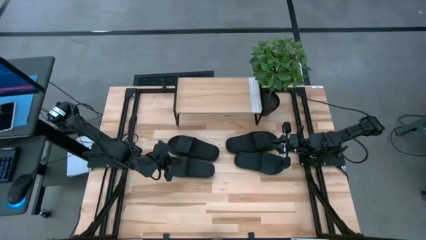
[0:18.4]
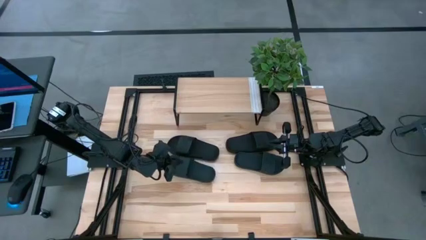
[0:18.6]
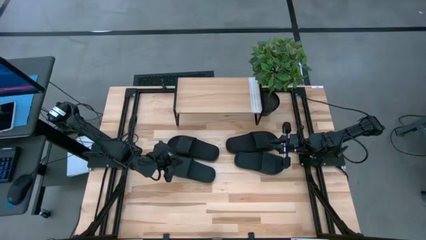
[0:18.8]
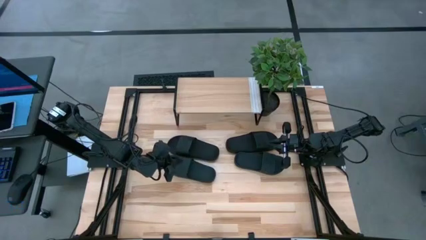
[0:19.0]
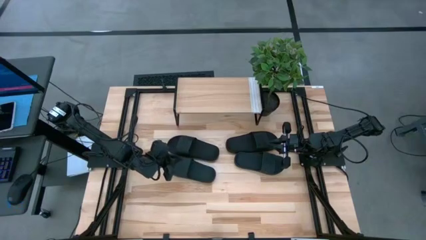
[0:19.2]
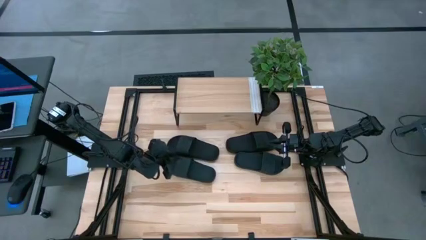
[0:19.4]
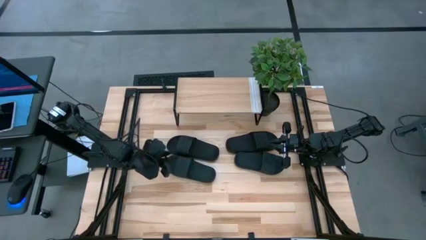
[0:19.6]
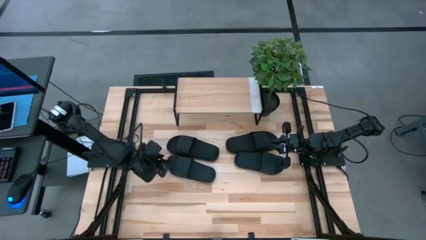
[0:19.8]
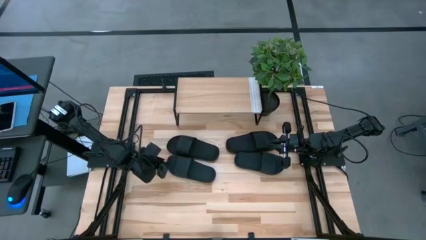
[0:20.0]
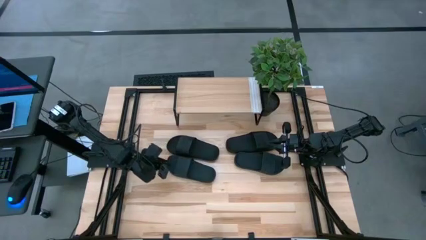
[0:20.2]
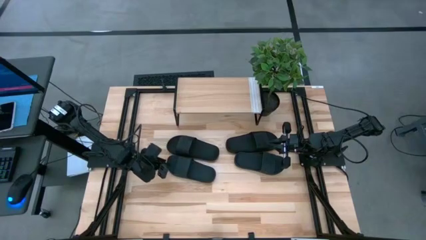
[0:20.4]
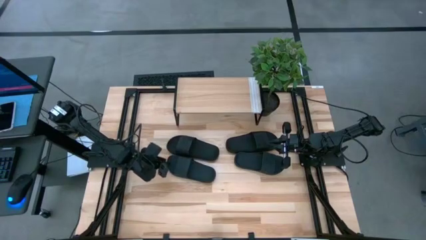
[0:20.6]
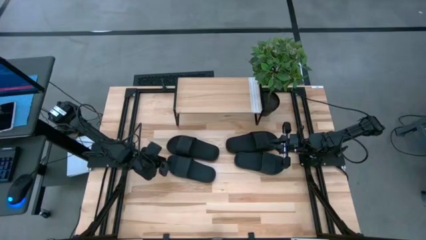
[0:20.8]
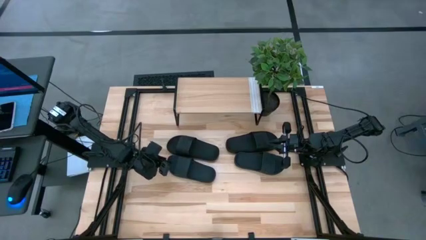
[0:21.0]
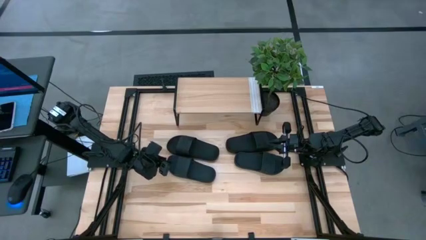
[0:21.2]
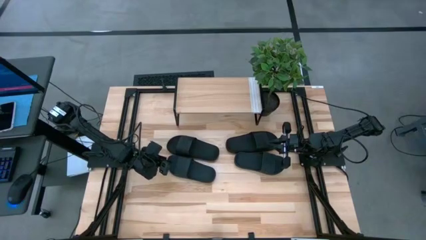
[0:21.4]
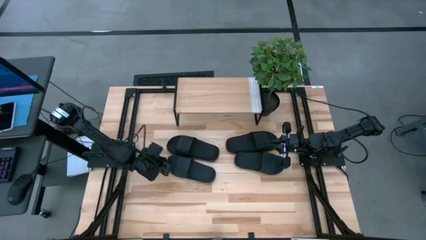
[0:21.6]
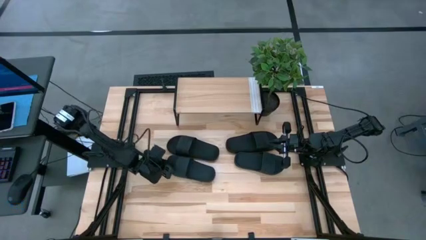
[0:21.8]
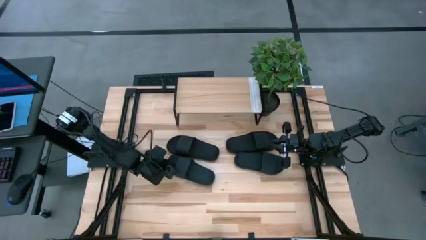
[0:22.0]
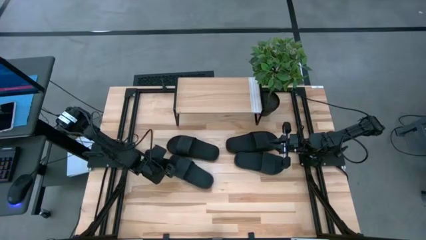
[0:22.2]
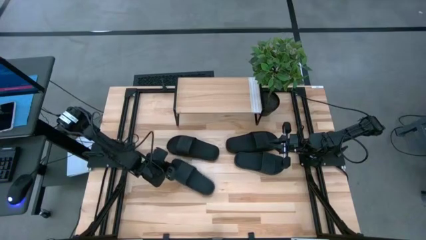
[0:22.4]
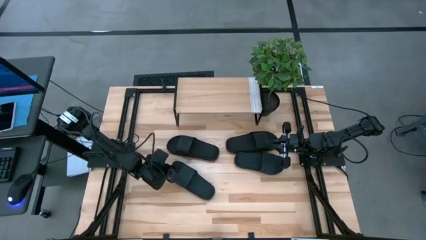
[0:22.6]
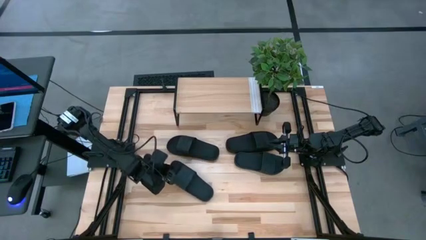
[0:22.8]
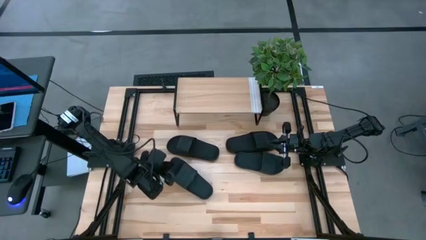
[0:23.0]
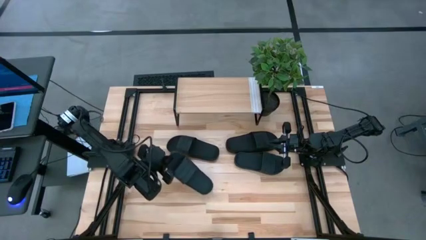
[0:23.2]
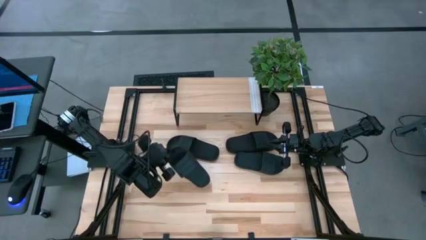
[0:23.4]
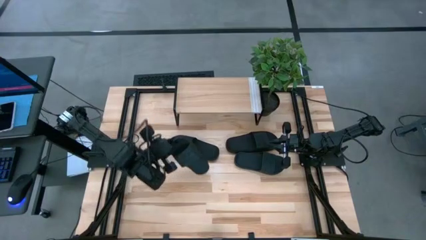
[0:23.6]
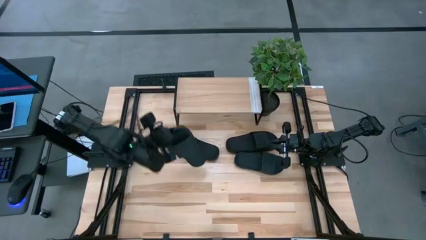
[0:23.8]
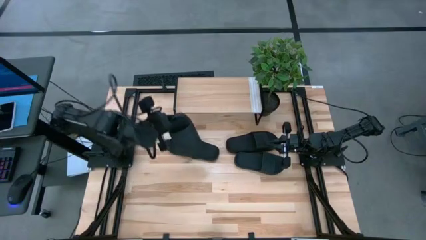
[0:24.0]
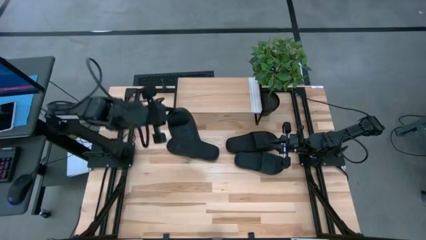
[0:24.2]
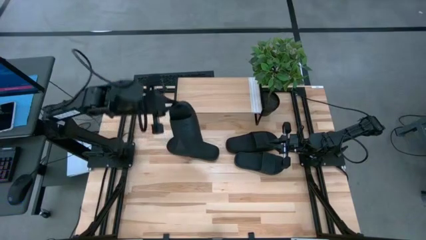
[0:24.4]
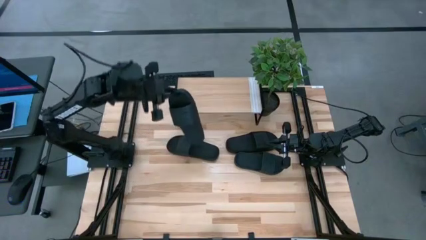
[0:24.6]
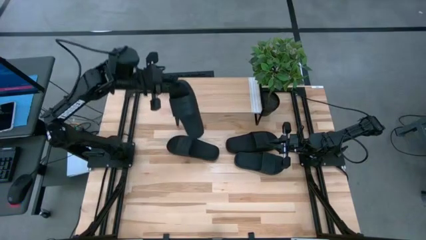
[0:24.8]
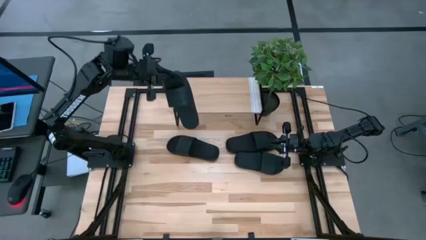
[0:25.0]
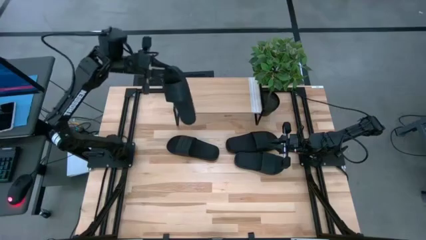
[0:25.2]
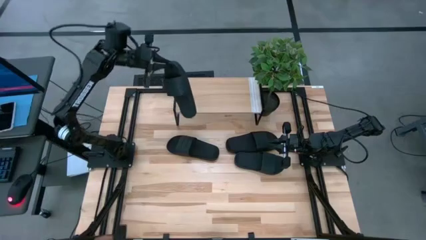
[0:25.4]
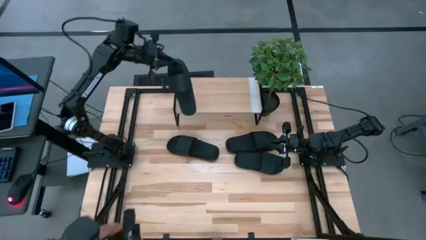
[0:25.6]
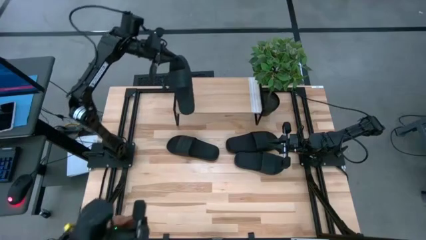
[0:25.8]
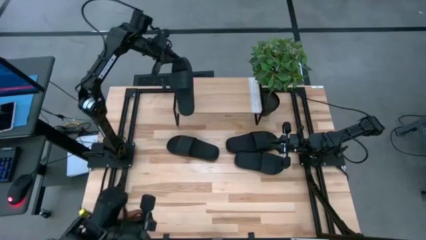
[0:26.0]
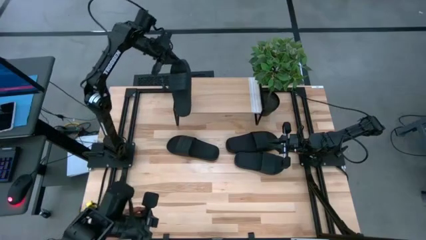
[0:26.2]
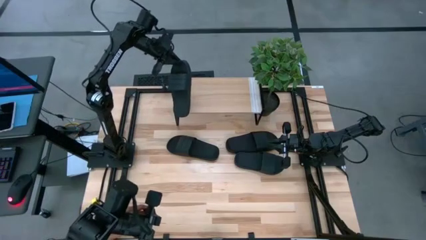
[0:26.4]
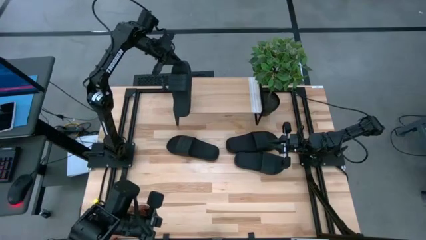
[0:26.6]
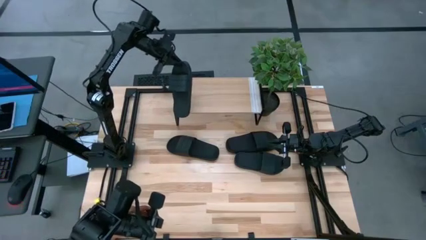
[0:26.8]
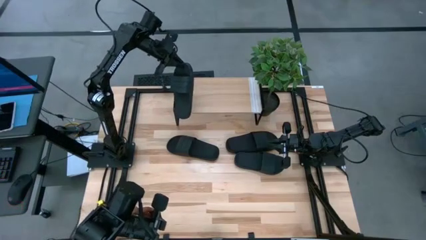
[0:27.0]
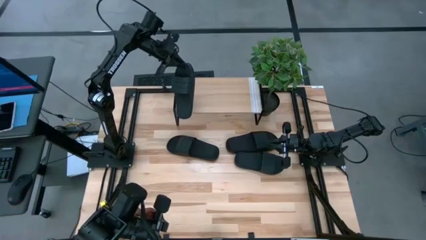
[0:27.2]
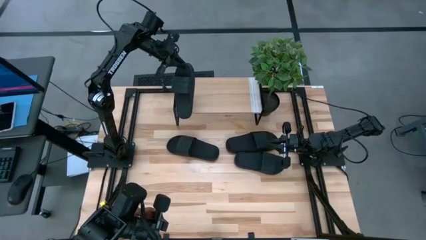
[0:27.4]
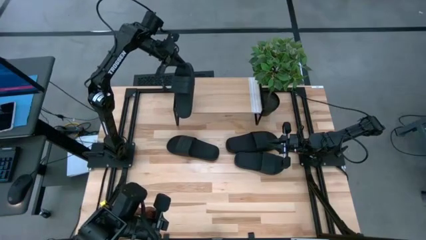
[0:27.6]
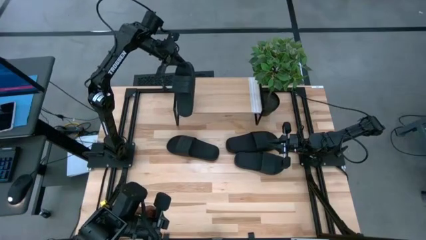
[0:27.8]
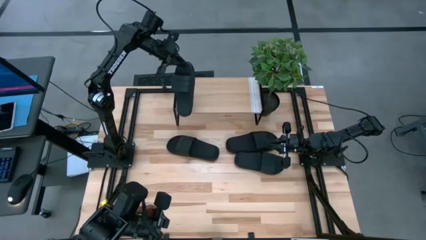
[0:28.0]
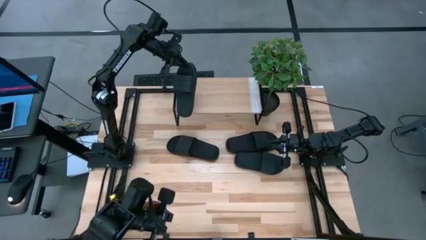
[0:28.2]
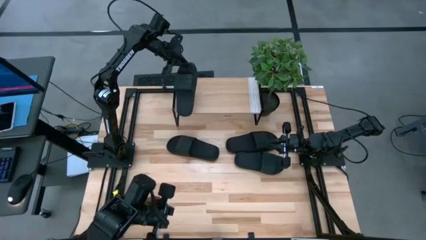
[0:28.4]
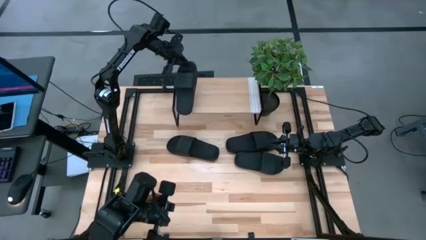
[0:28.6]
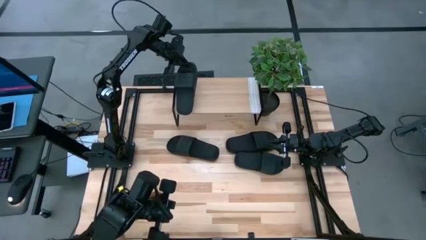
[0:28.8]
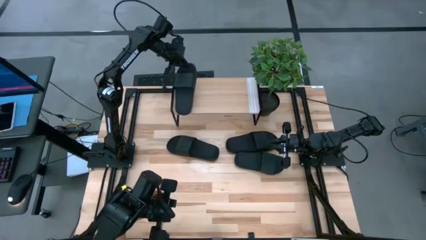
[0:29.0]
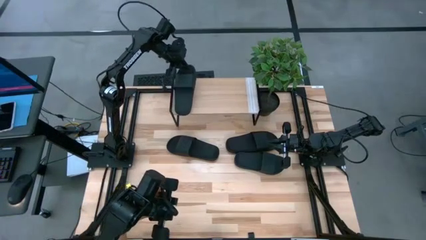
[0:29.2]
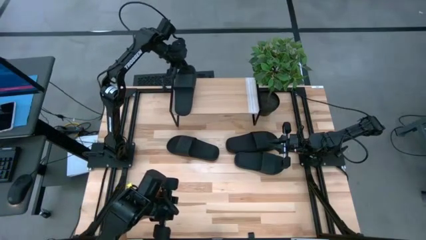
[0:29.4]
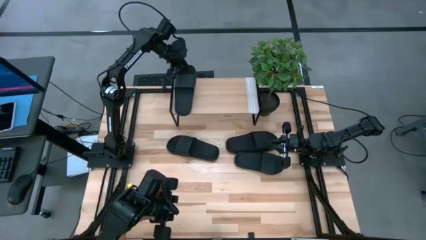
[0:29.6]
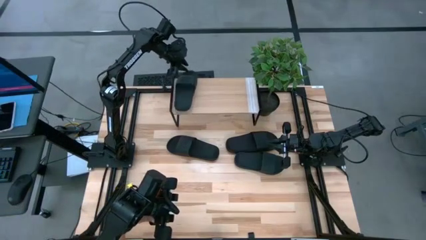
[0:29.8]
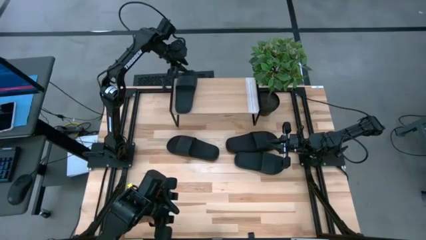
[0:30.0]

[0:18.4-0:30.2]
Task: Pick and place slides into the shelf
Put the bottom left black slide on the shelf

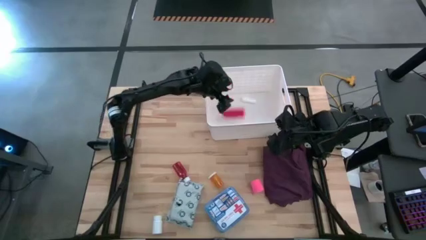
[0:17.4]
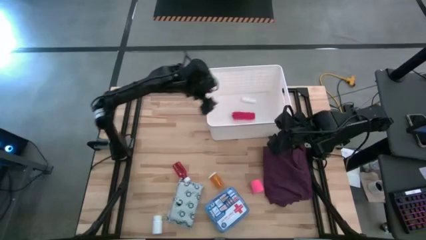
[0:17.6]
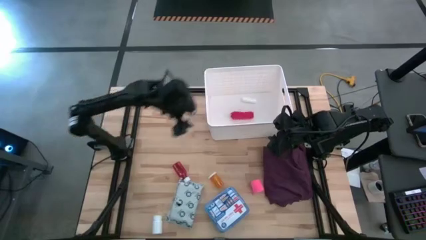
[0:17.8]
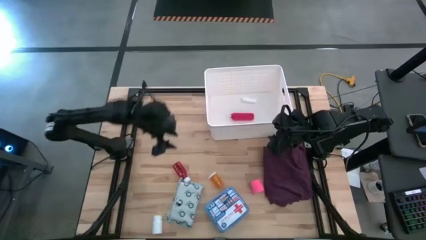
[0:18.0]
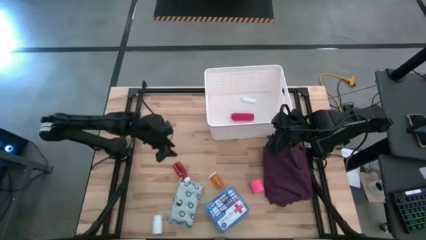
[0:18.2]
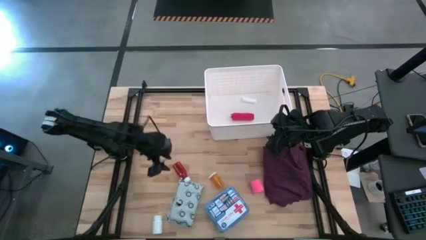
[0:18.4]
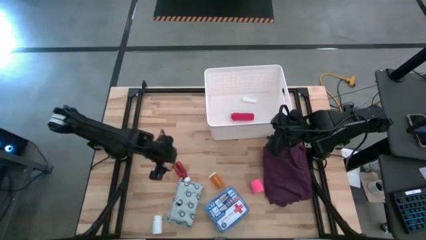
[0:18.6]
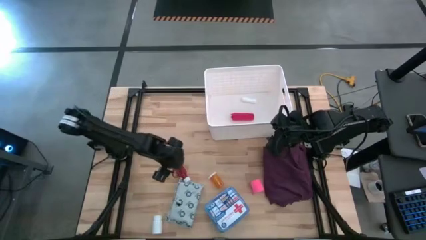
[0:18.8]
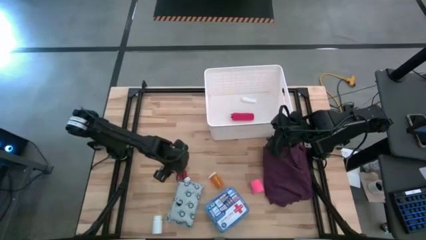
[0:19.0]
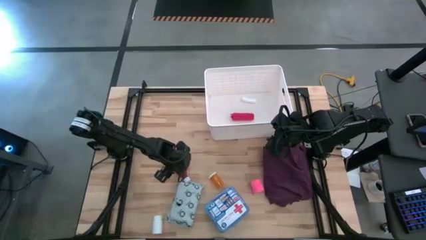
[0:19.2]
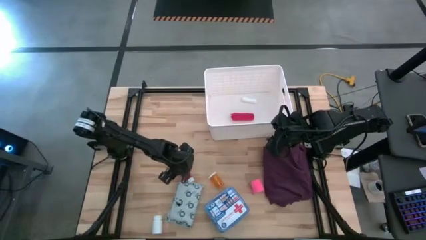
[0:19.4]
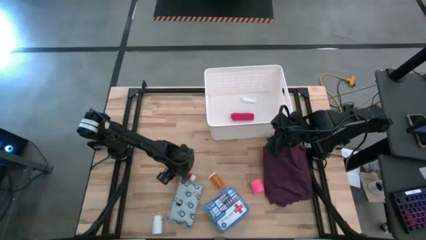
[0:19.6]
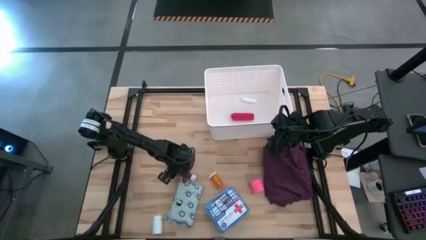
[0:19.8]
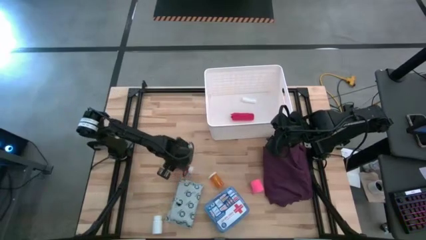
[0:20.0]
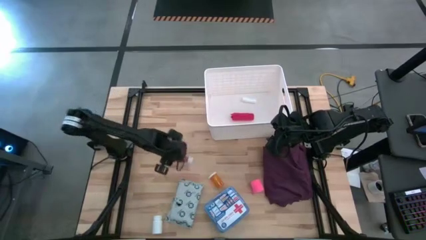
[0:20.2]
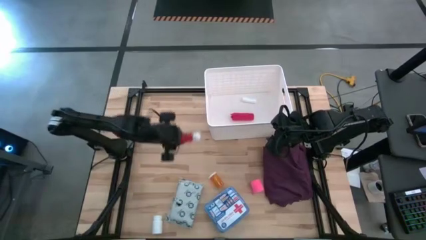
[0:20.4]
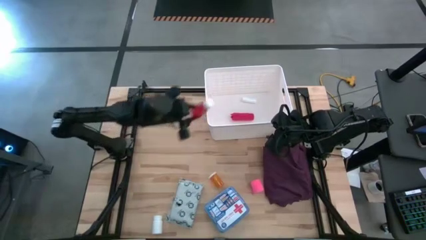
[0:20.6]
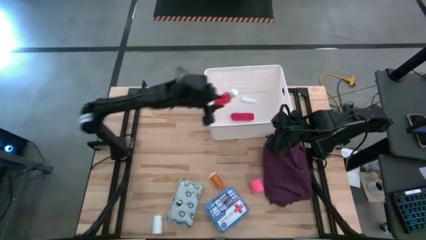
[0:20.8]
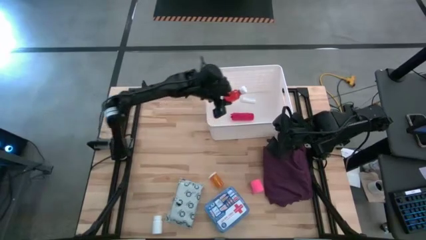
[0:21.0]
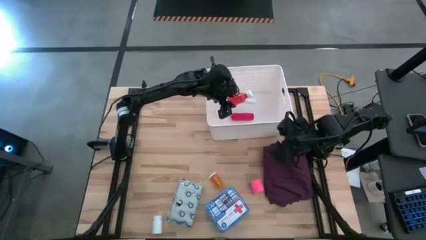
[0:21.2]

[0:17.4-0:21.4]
Task: Pick & place medical supplies in basket/bin
Put the red plastic bottle into the white bin

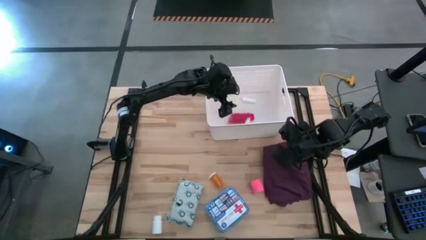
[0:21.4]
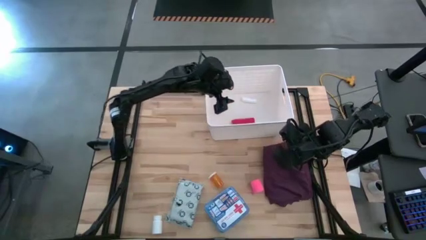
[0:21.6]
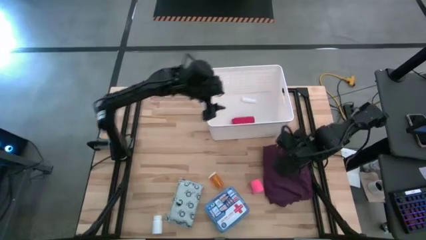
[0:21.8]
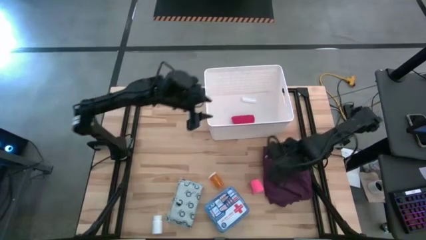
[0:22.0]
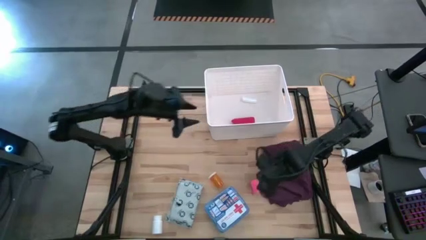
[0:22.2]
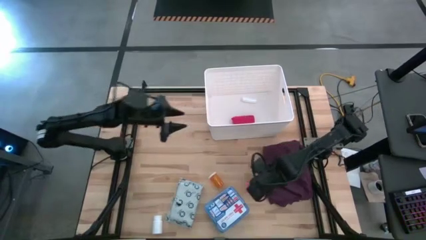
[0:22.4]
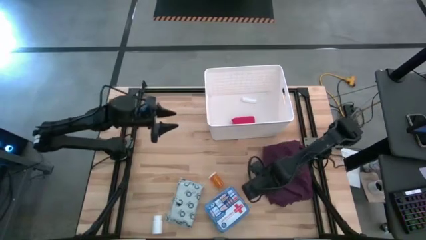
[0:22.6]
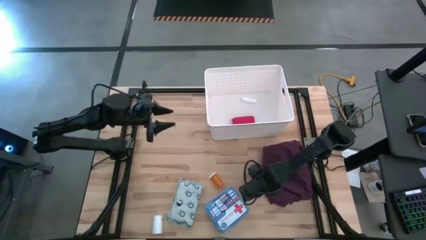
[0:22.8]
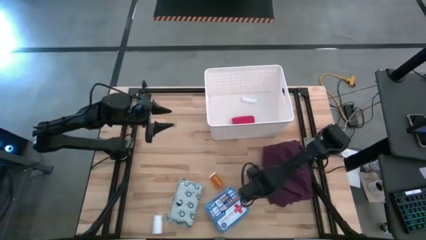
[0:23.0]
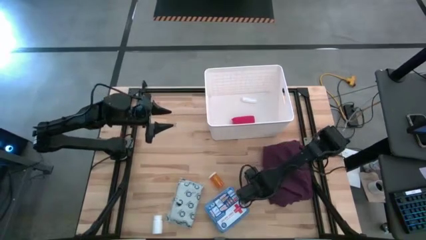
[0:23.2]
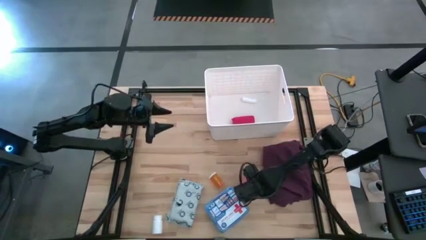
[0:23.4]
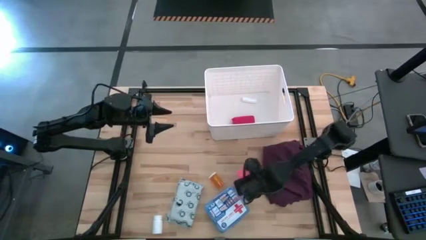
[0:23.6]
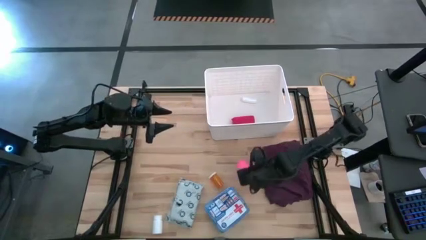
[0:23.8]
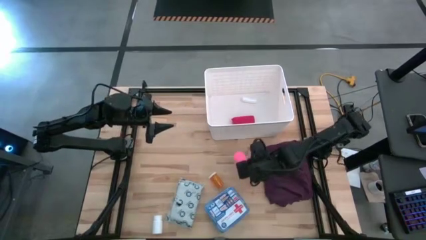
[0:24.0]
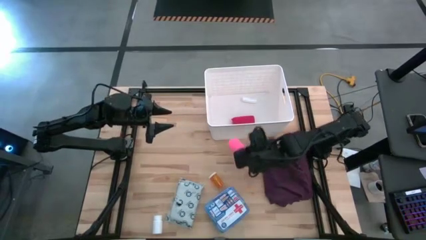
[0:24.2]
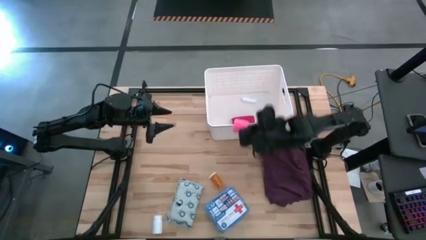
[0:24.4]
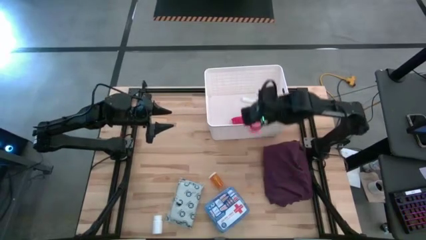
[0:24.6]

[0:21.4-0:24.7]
Put the pink bandage into the white bin
